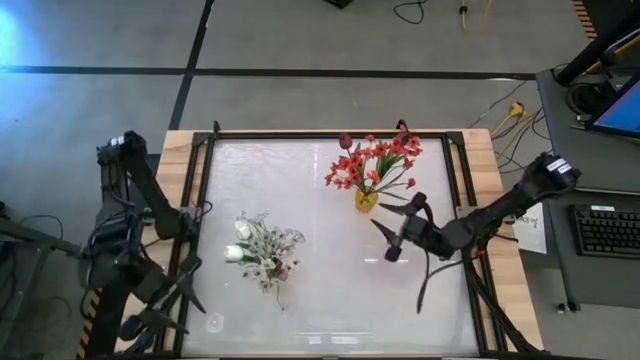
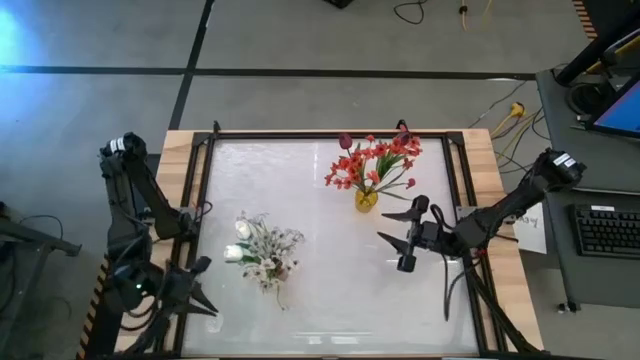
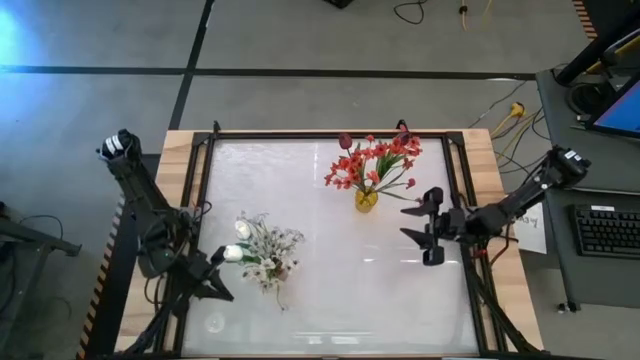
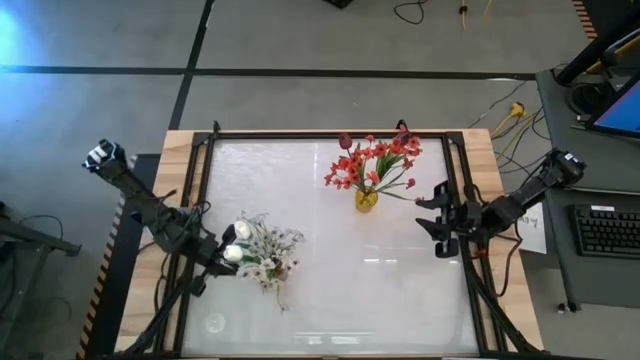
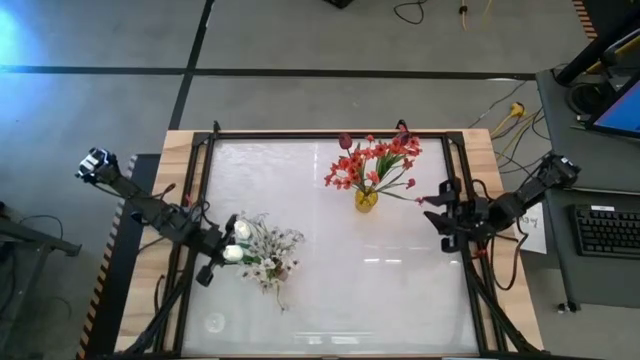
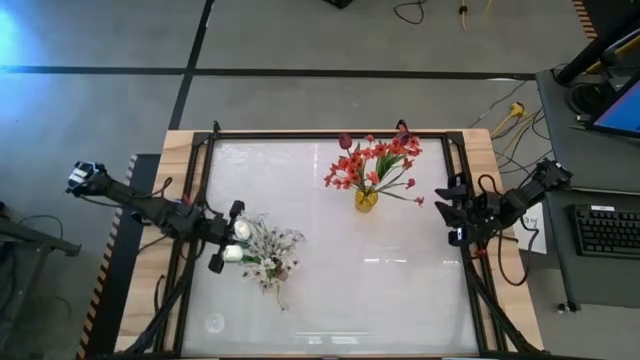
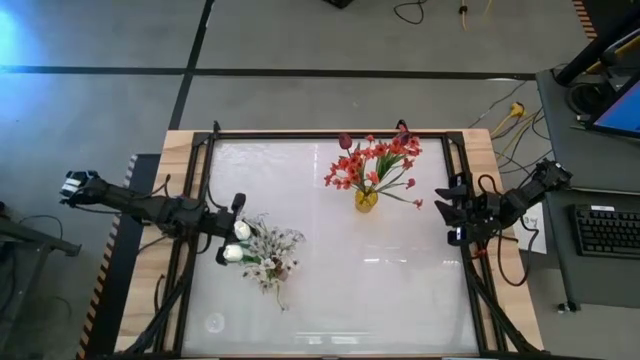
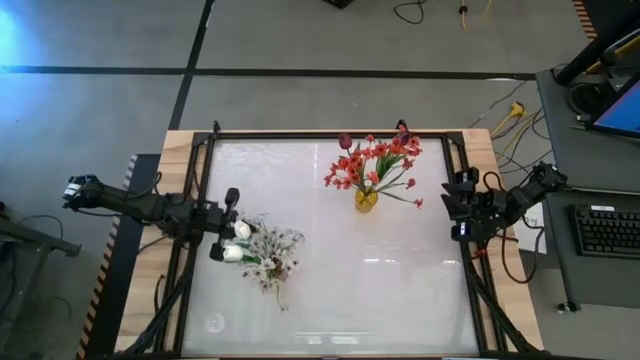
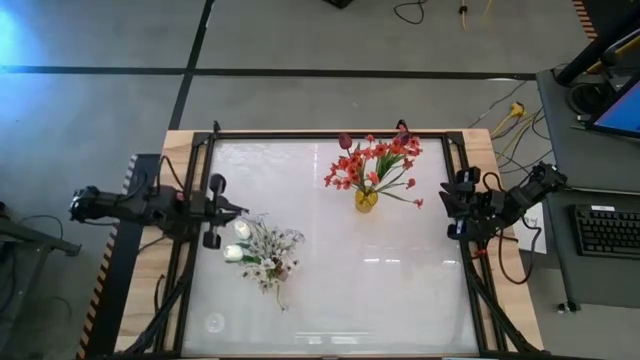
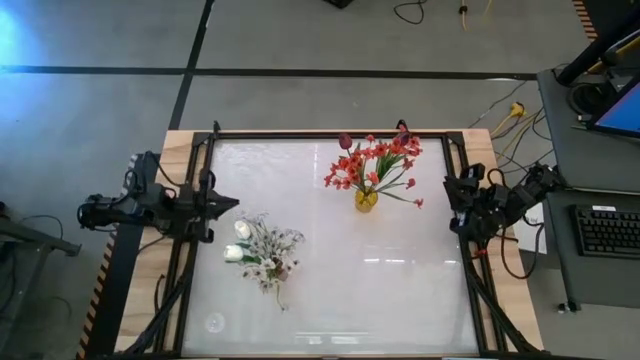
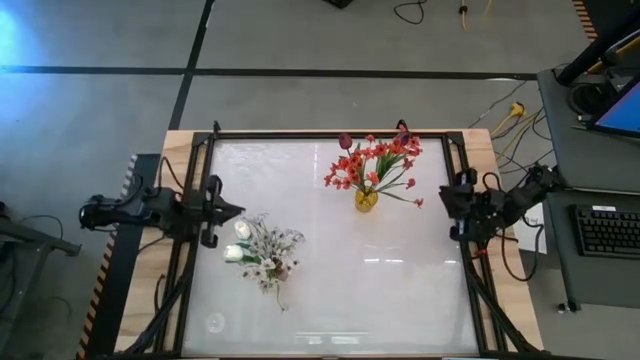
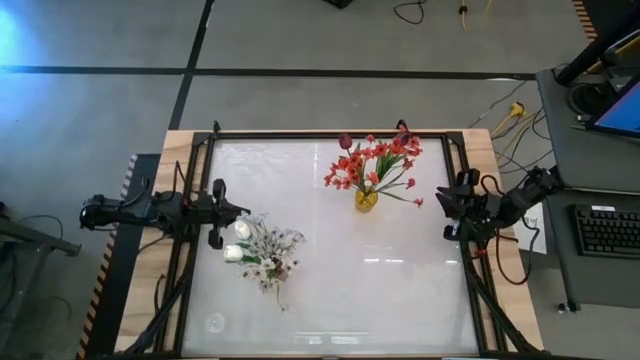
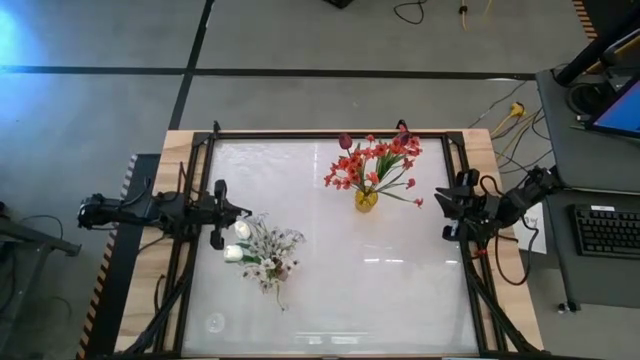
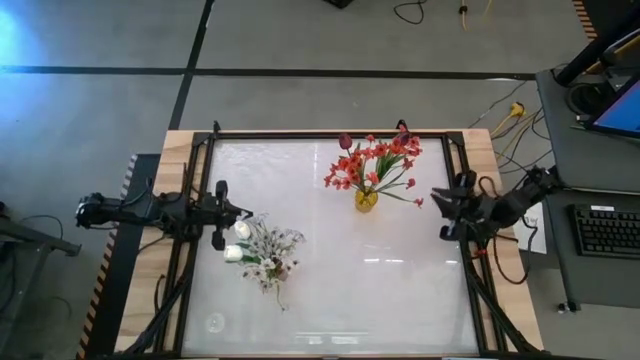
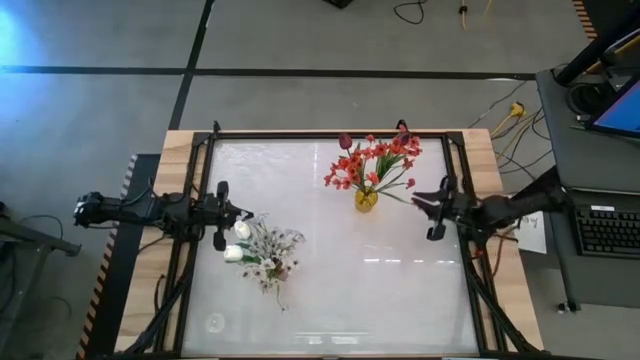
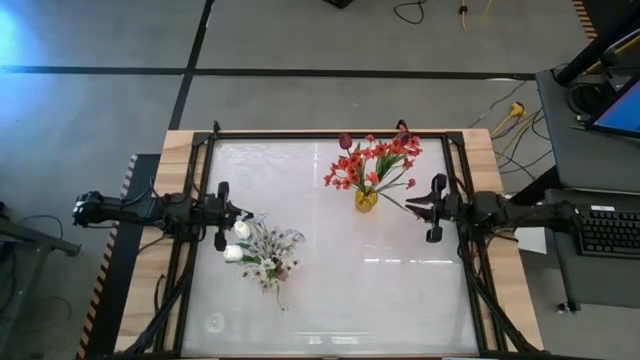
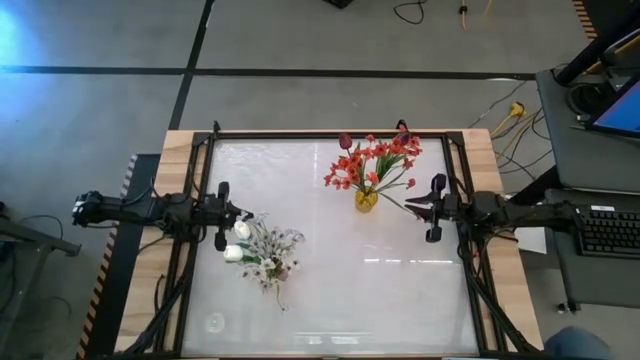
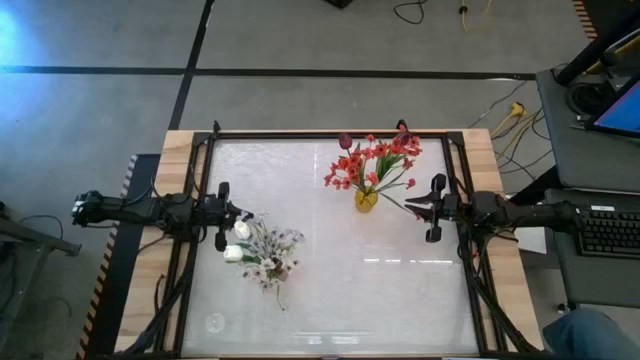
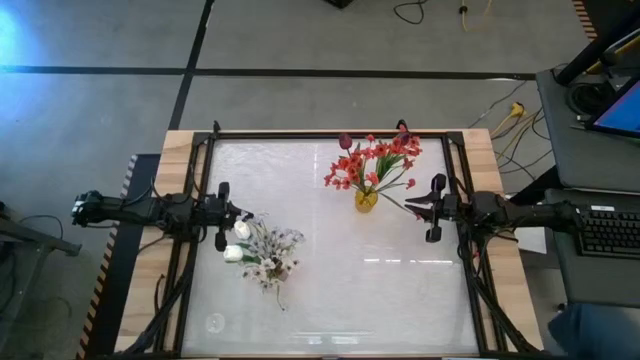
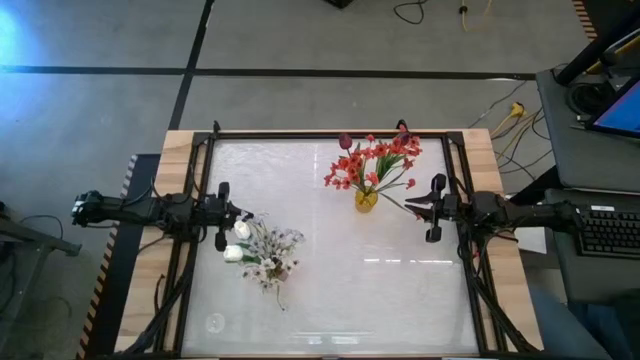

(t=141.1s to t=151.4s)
Task: Sort flowers into vase by color
Return to Home Position

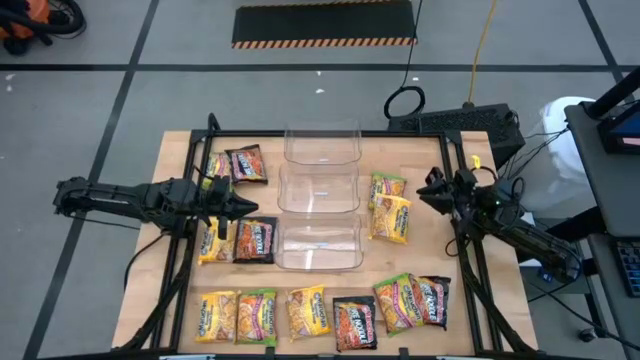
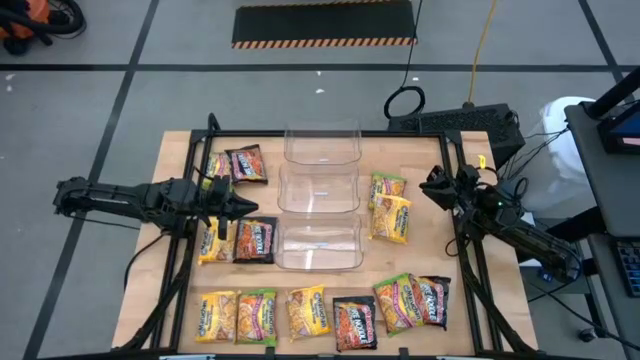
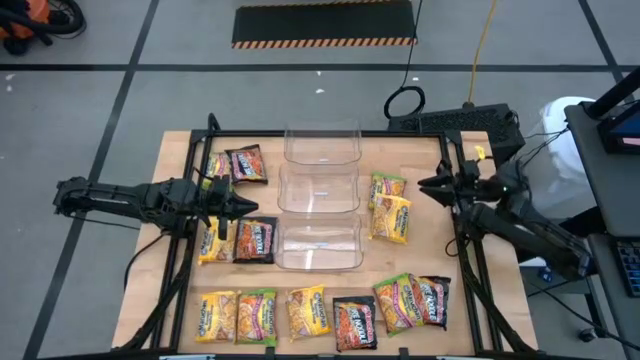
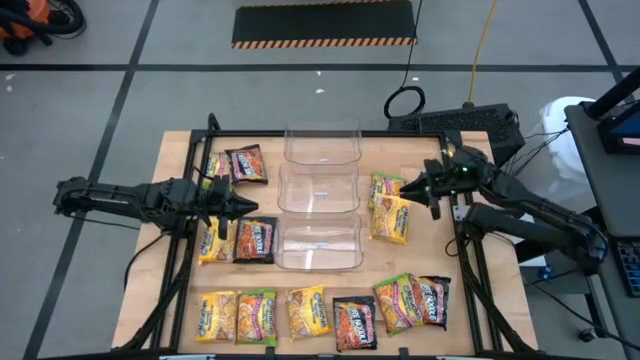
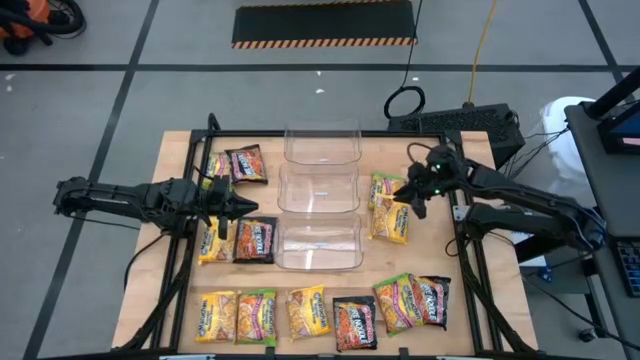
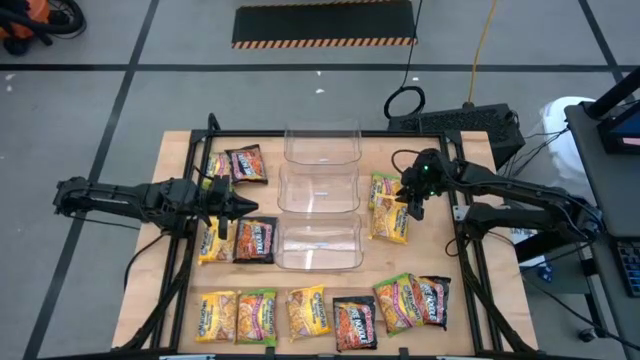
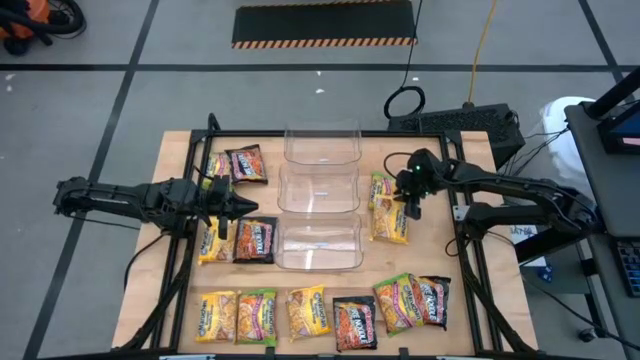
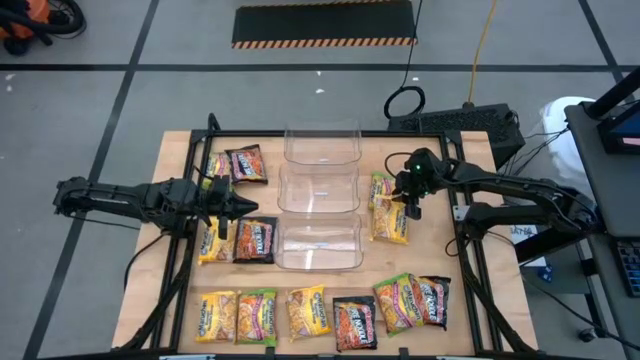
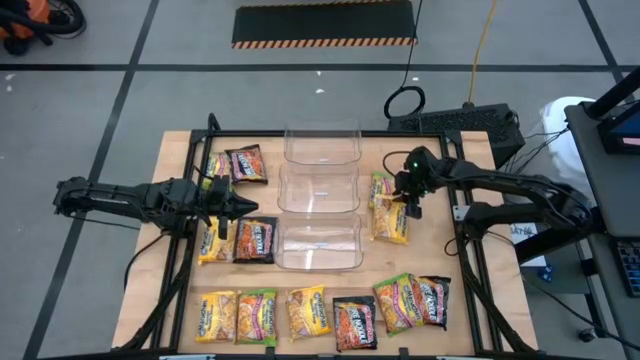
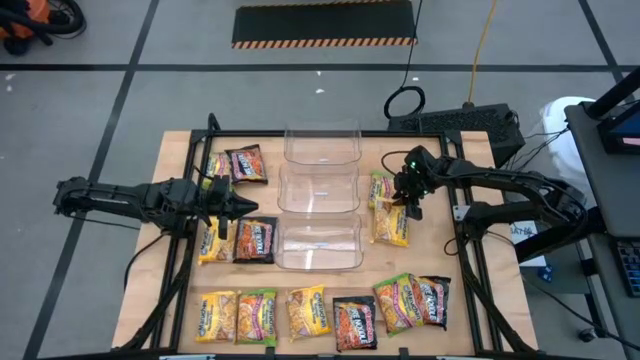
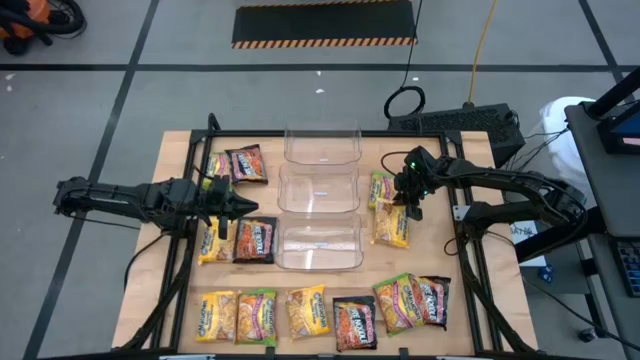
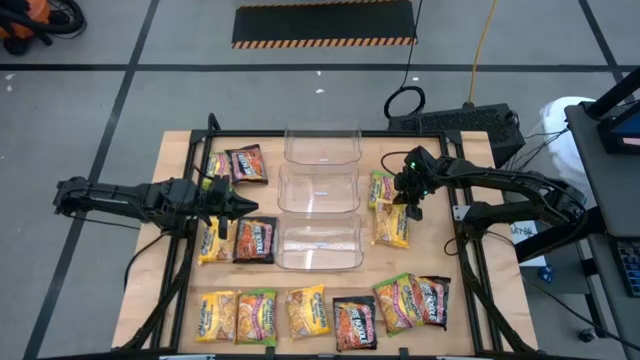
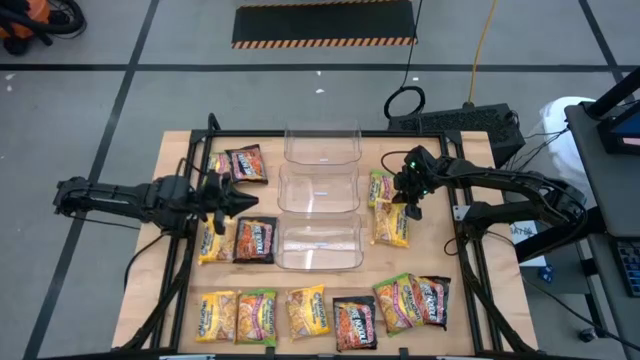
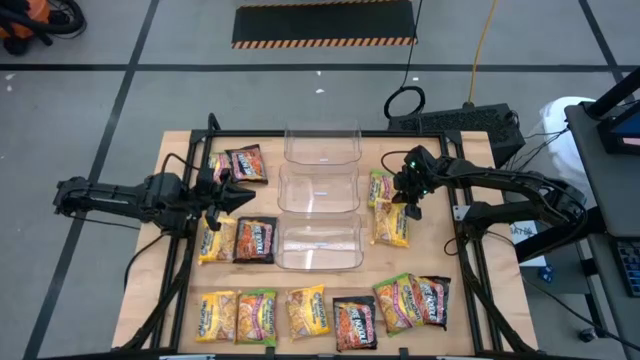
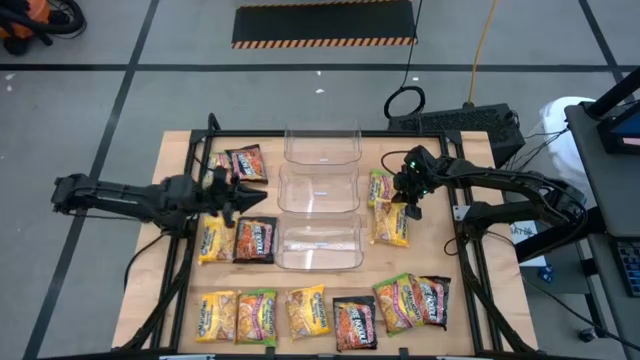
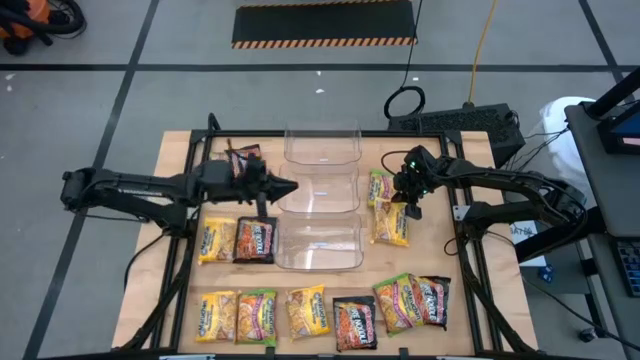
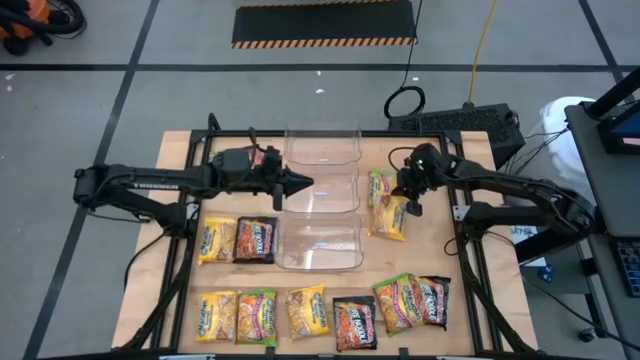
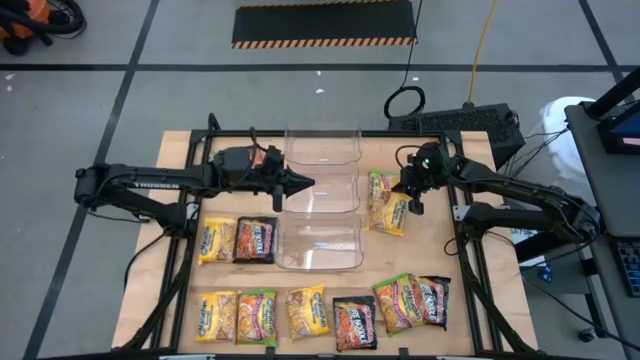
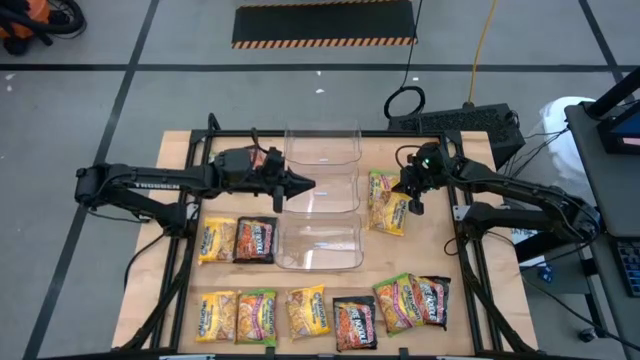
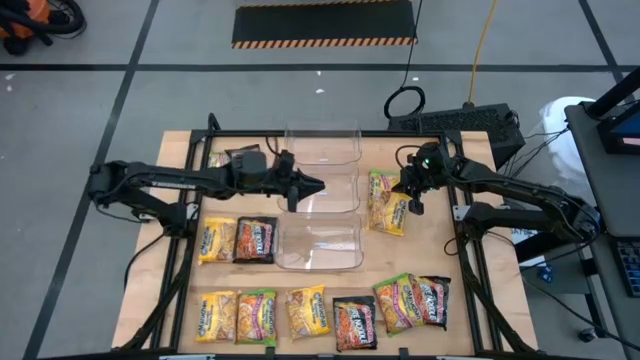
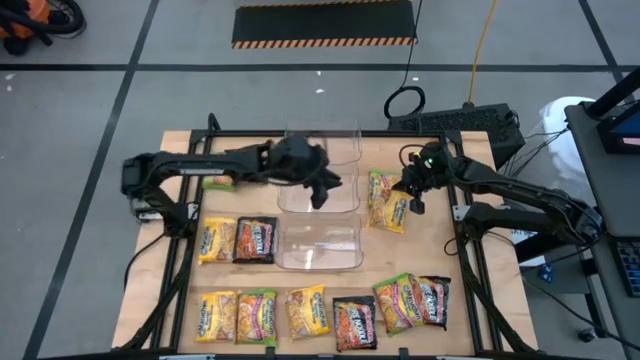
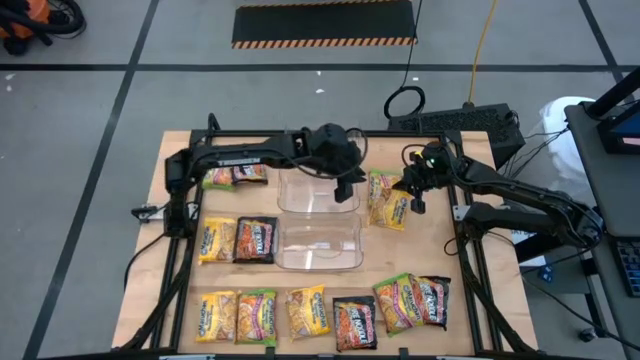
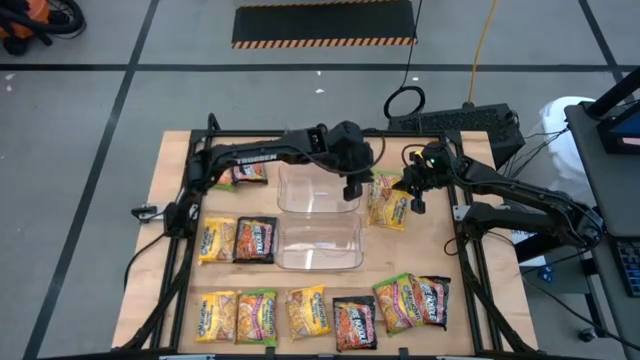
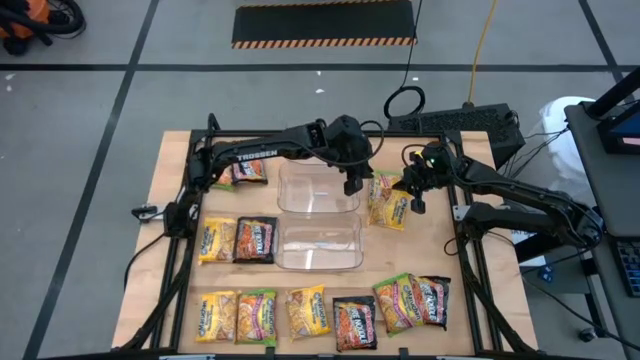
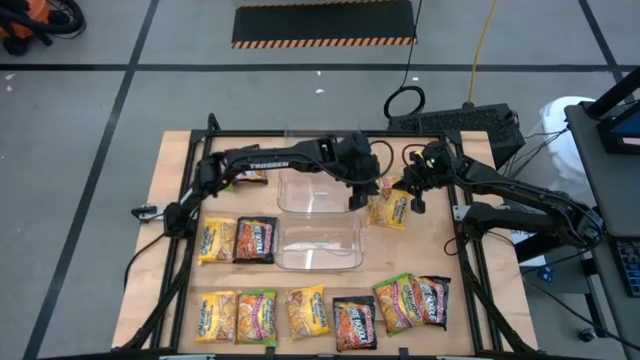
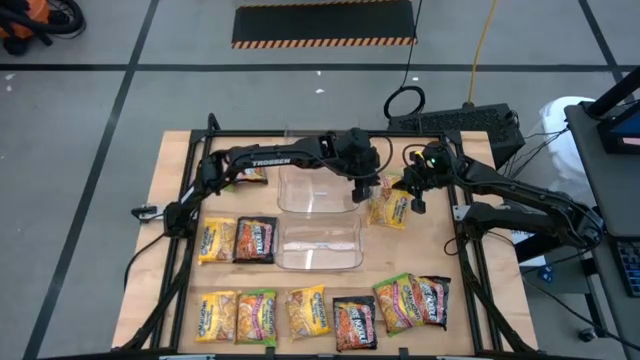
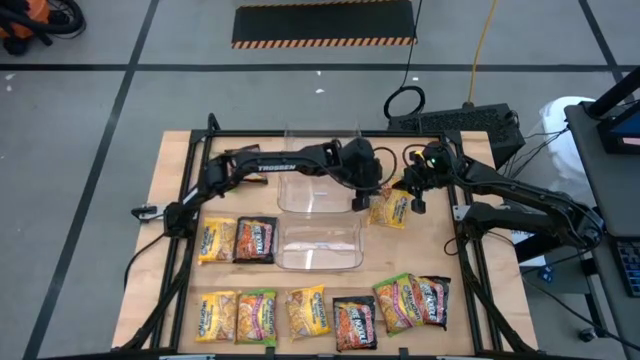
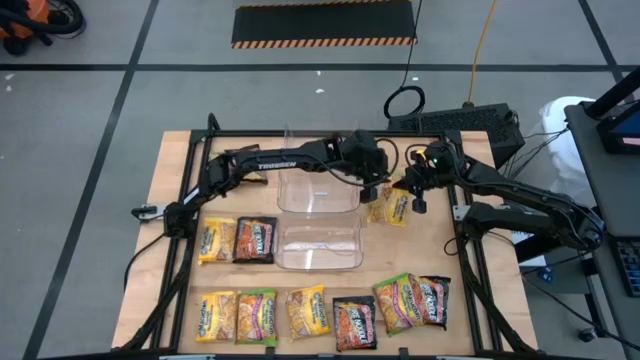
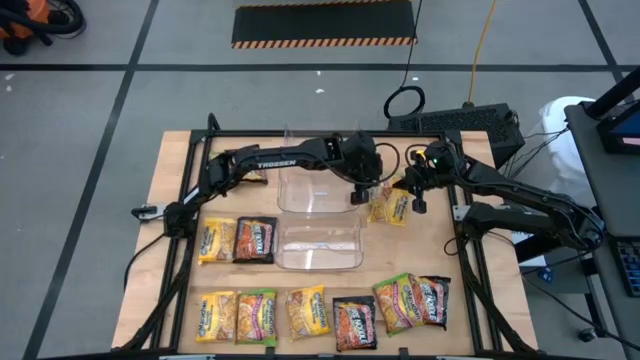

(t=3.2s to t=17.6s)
Task: Sort Maruchan noodles
Put the yellow noodle pack into the bottom transparent bin
